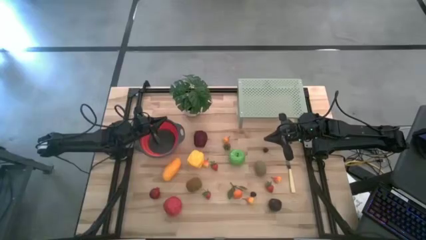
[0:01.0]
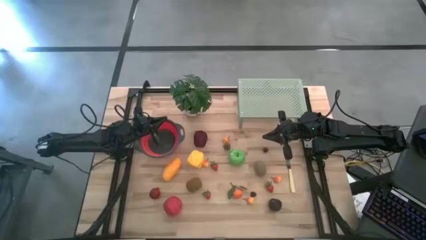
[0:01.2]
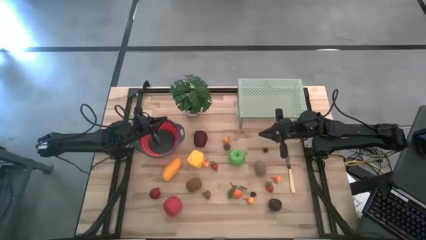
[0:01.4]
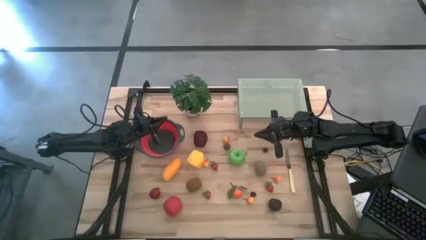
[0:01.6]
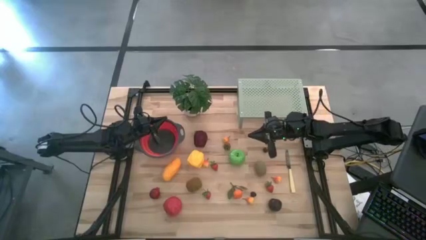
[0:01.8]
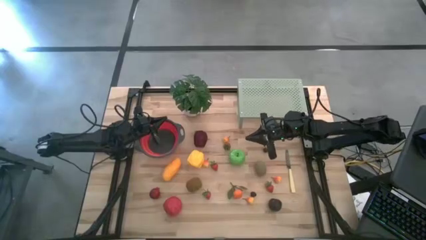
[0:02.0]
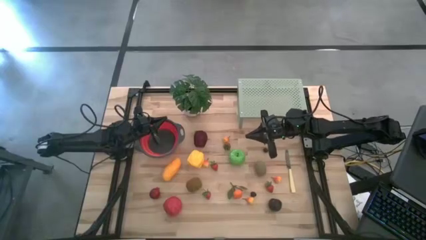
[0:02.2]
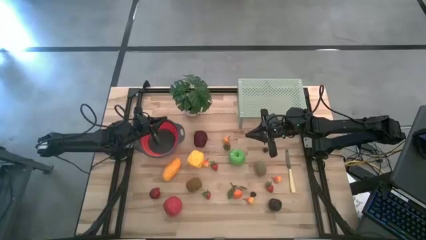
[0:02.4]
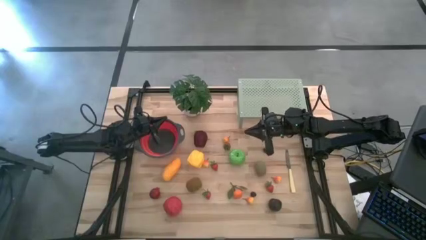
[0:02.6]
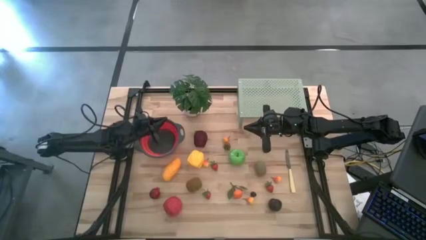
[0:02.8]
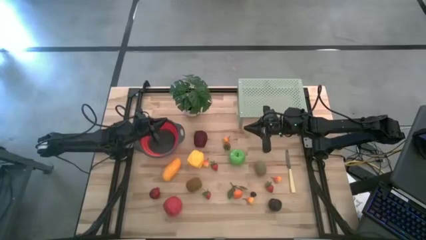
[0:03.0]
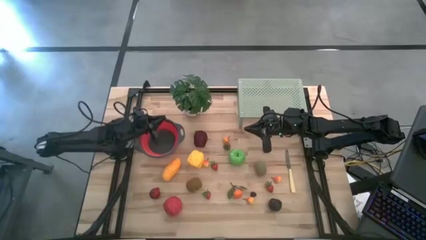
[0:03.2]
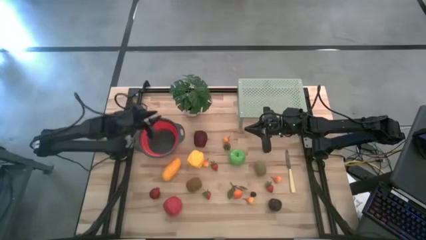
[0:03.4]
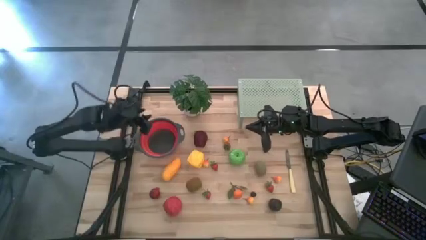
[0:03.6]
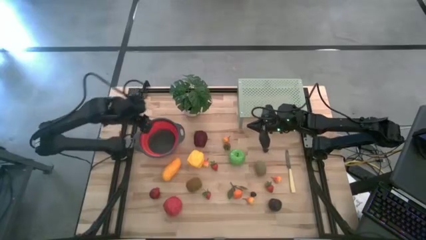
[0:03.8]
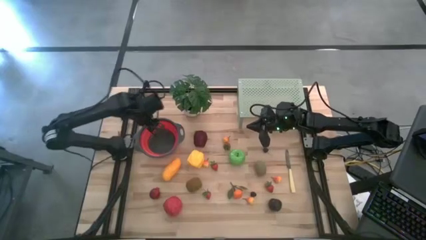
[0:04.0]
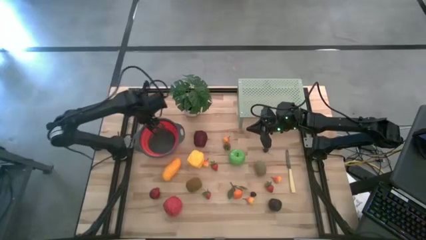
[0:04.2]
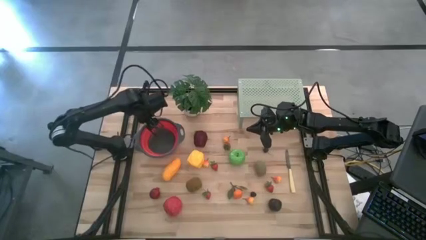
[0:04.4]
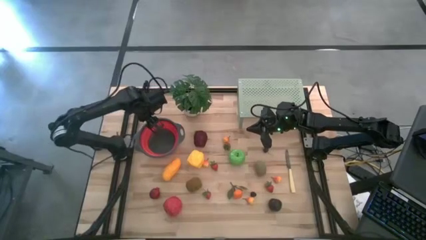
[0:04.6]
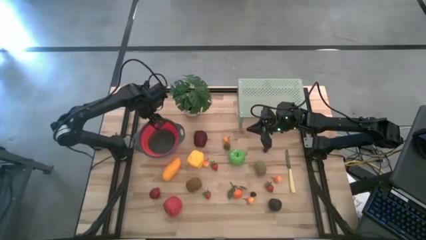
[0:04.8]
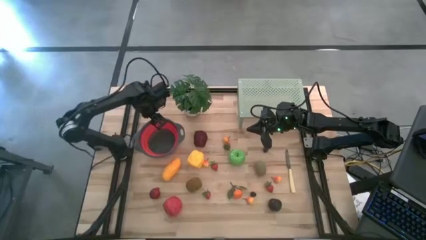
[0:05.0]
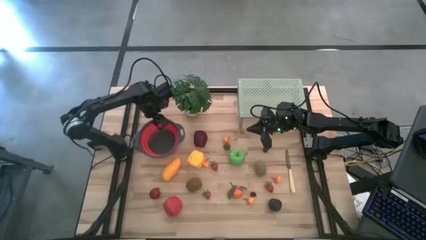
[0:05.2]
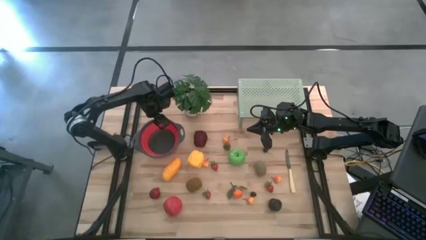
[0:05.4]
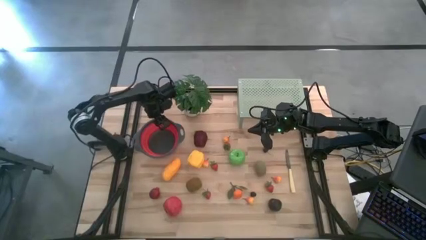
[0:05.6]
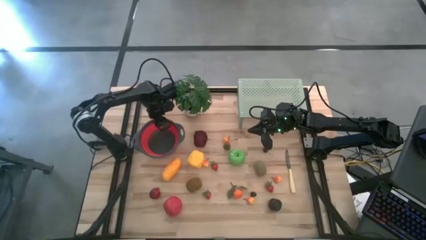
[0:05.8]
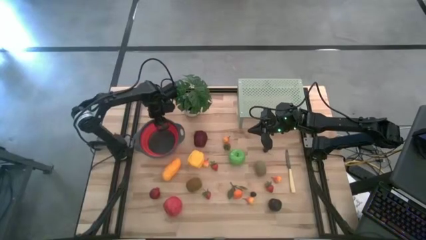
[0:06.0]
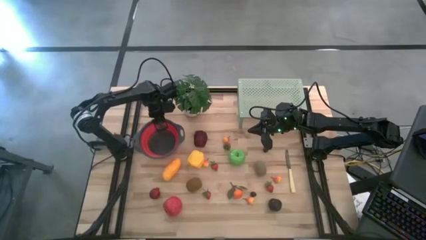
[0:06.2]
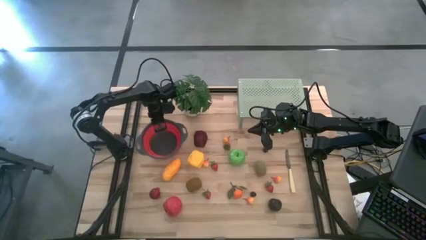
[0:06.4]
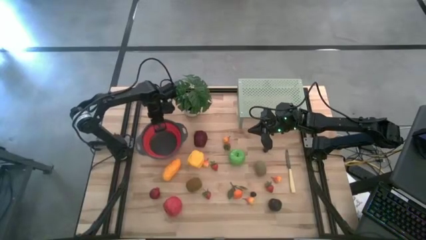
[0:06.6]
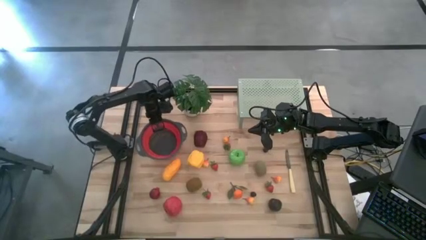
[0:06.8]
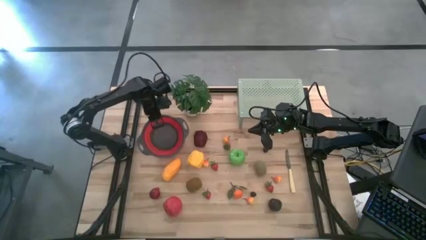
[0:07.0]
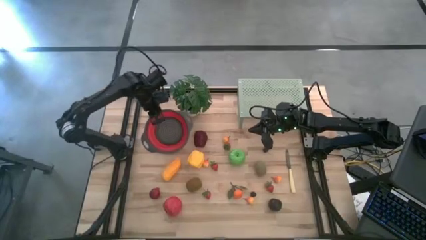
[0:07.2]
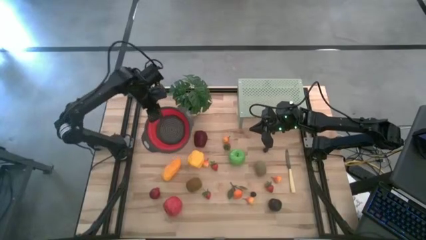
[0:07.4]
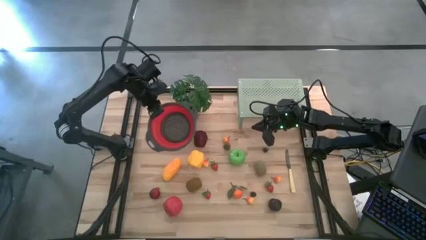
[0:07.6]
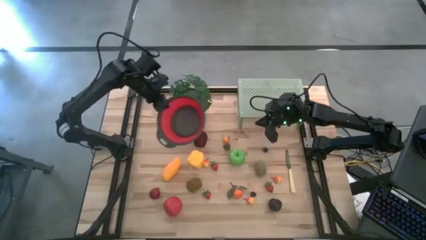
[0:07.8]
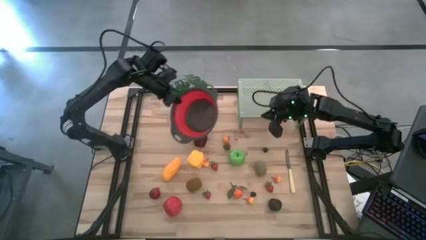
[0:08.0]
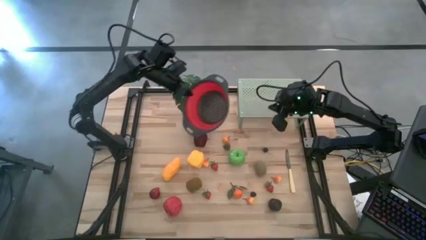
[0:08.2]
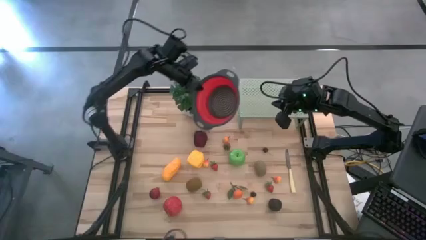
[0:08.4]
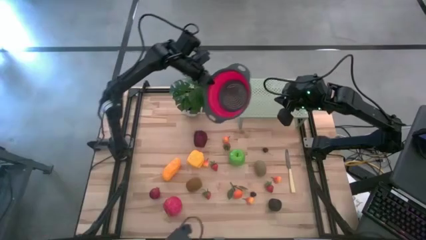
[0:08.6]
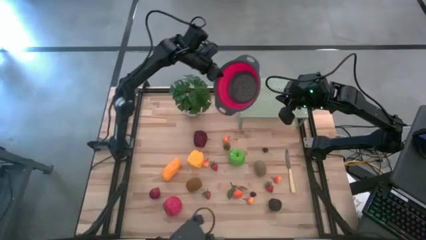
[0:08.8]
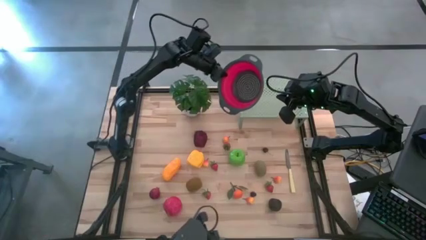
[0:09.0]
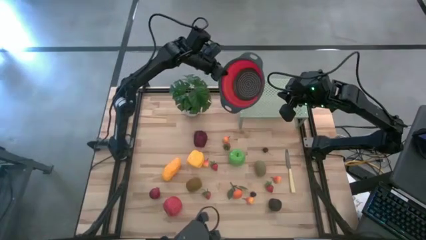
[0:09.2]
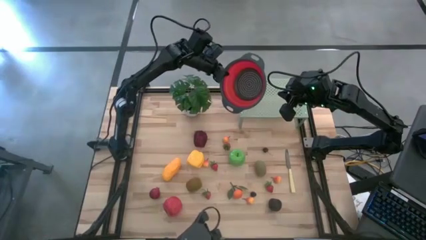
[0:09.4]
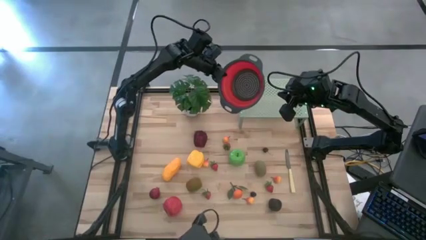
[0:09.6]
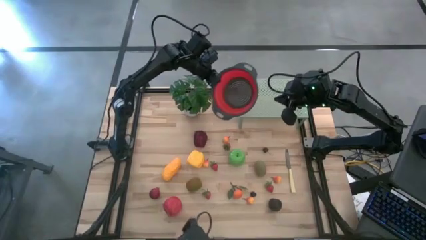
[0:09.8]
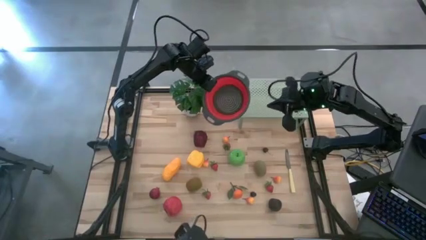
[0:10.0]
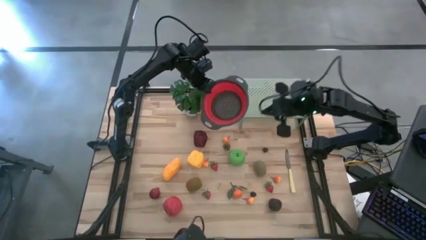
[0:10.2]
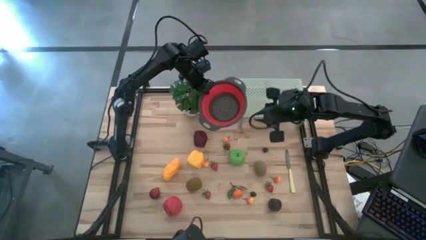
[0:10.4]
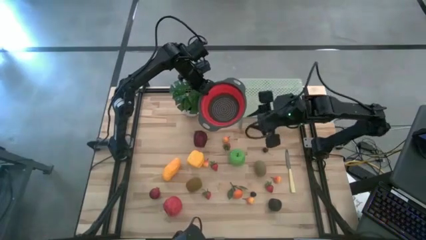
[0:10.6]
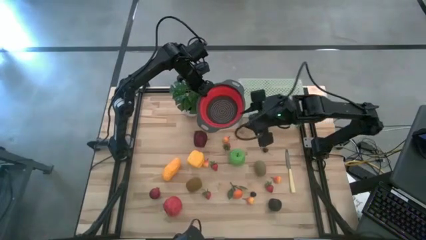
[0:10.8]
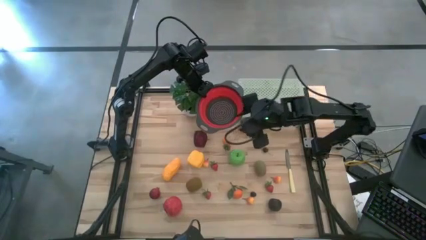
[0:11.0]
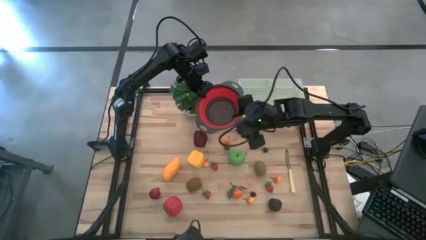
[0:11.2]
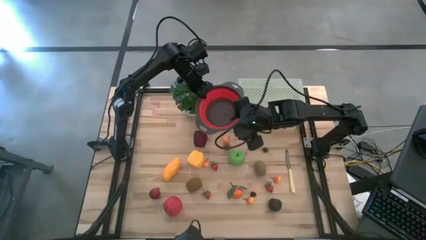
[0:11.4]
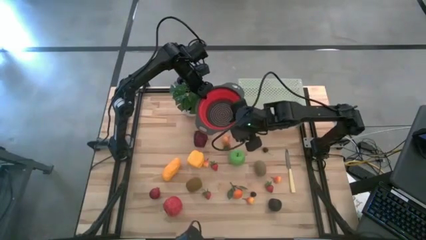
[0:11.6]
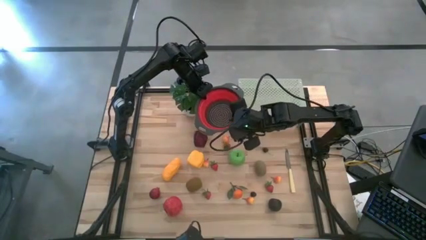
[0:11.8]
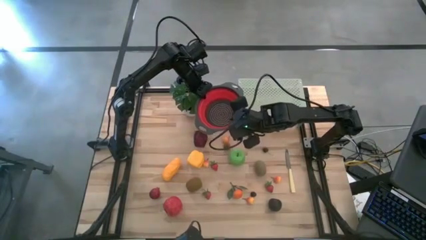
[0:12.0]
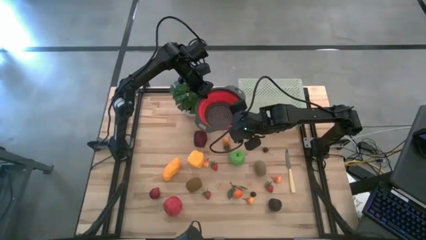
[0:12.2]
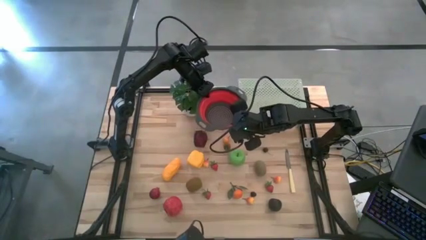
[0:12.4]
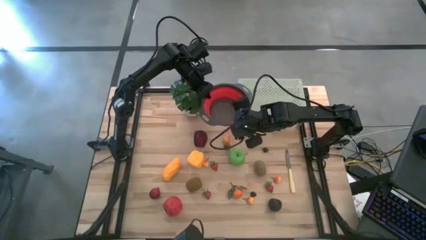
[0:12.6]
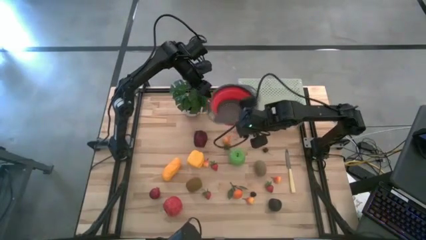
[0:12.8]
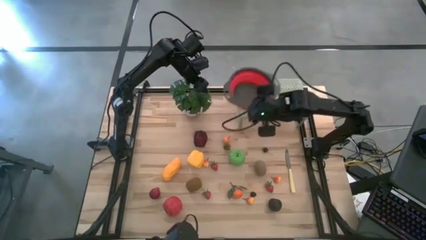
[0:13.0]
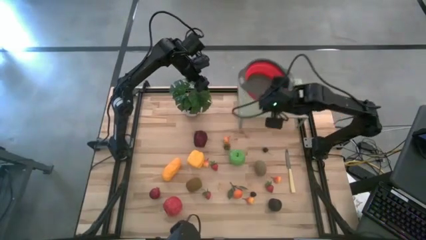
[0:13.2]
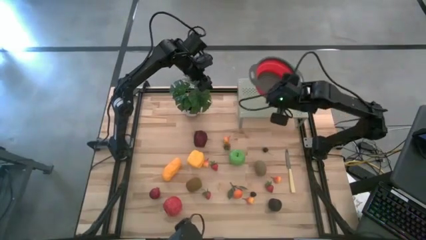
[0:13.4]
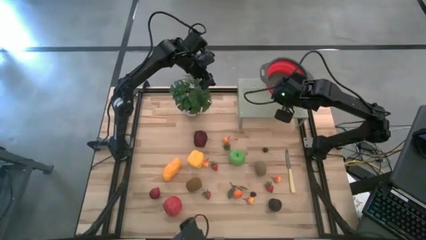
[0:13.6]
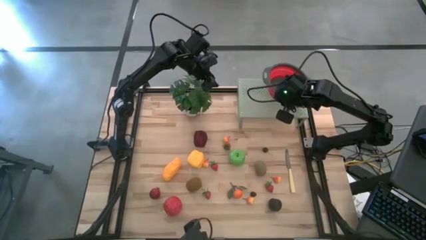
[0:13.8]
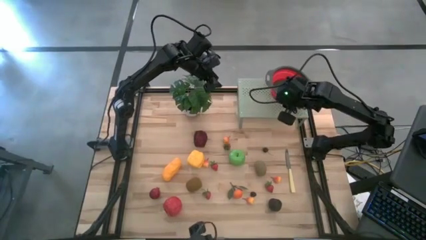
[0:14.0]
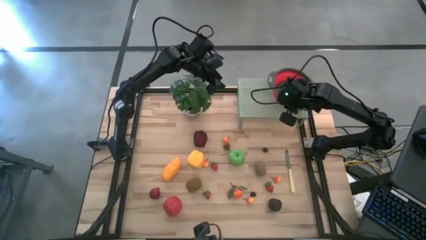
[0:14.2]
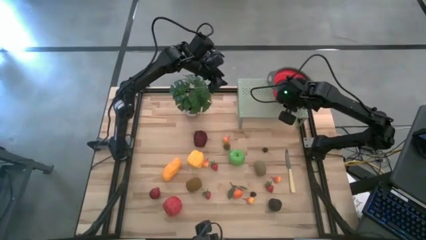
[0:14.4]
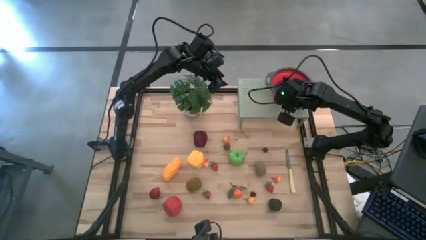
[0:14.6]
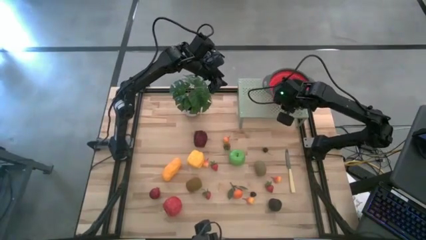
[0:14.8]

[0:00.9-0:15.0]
Task: Pick & Place Fruit
Put the red strainer bowl on the shelf
